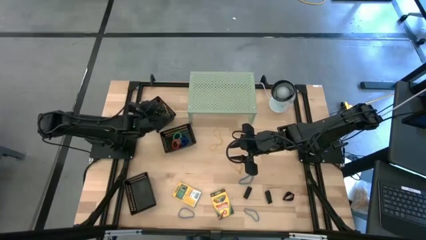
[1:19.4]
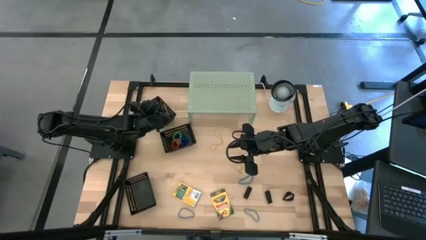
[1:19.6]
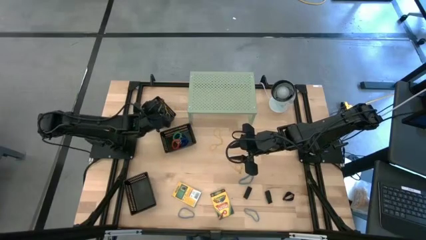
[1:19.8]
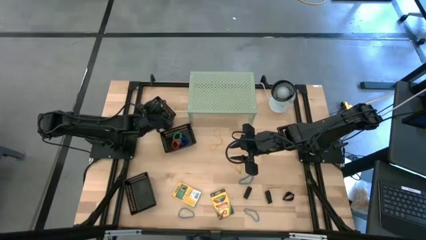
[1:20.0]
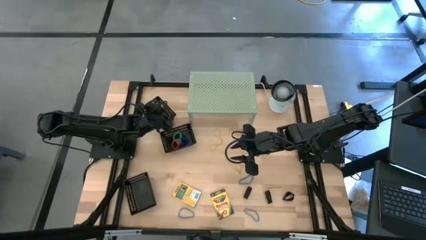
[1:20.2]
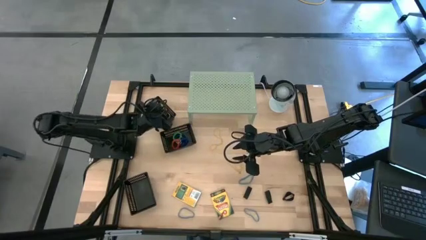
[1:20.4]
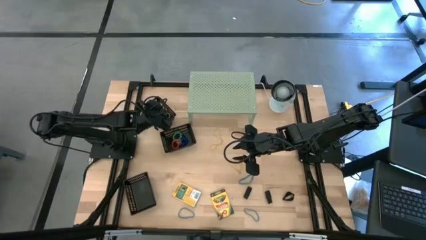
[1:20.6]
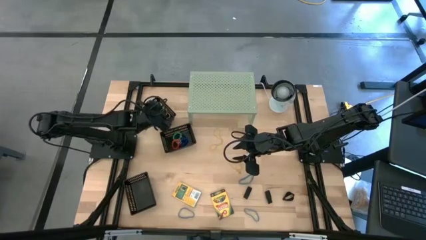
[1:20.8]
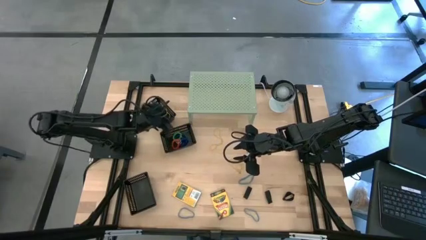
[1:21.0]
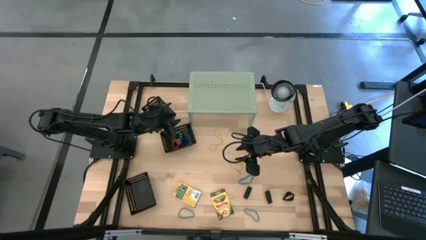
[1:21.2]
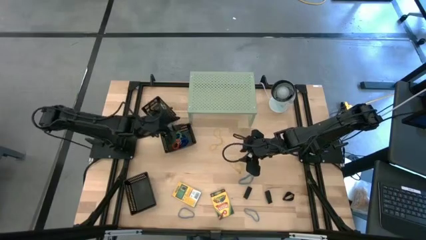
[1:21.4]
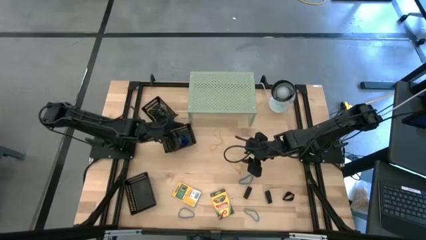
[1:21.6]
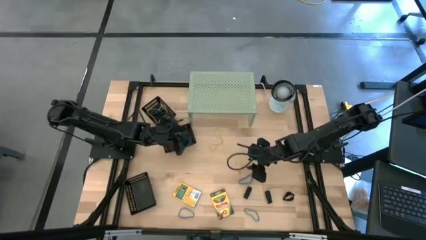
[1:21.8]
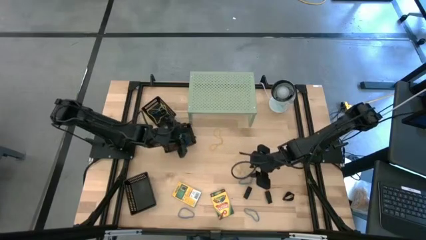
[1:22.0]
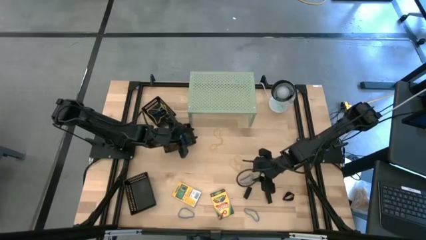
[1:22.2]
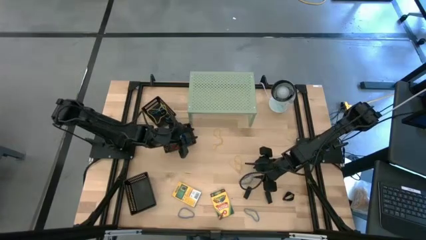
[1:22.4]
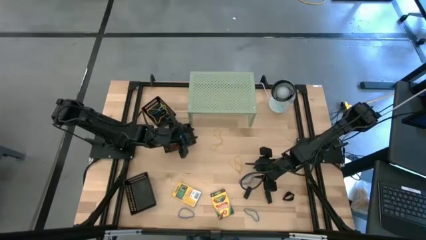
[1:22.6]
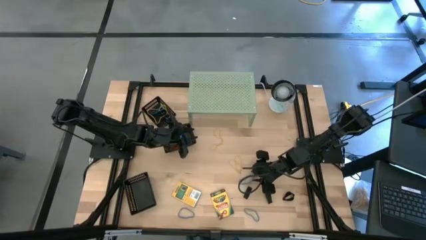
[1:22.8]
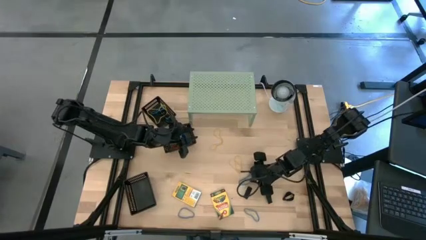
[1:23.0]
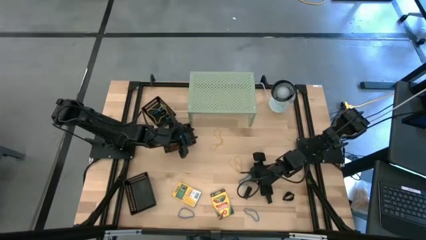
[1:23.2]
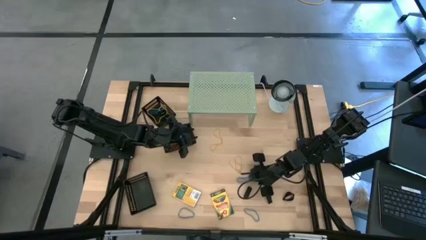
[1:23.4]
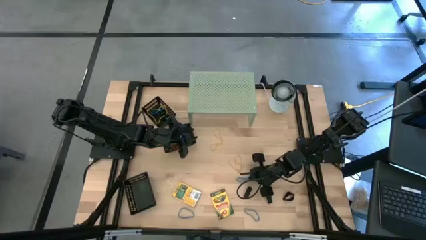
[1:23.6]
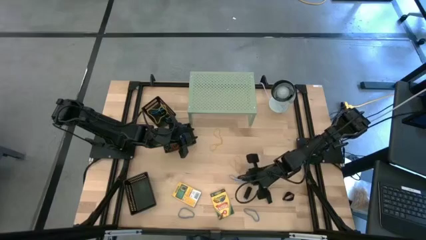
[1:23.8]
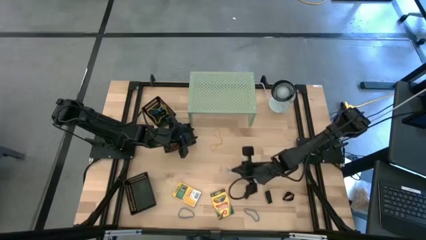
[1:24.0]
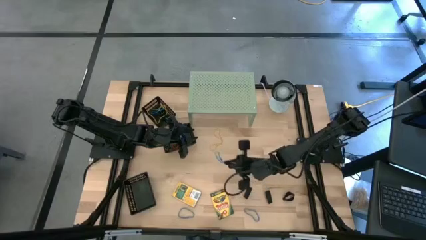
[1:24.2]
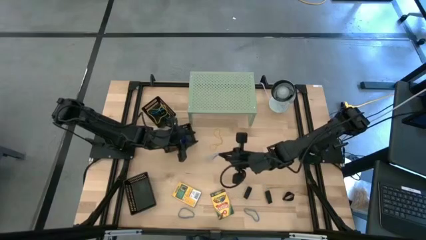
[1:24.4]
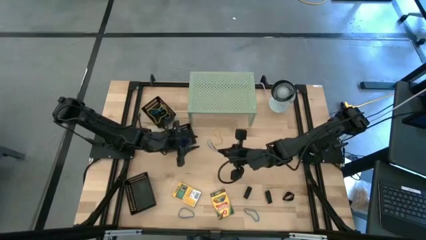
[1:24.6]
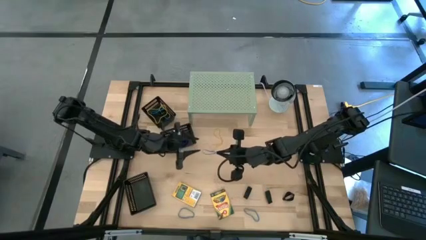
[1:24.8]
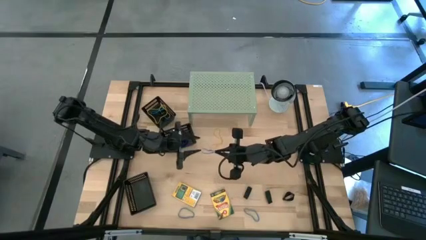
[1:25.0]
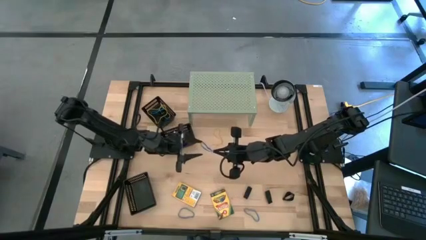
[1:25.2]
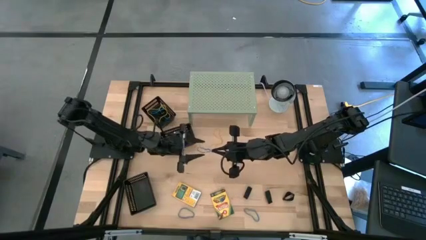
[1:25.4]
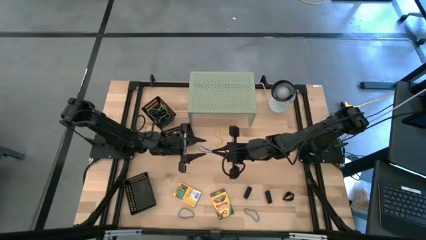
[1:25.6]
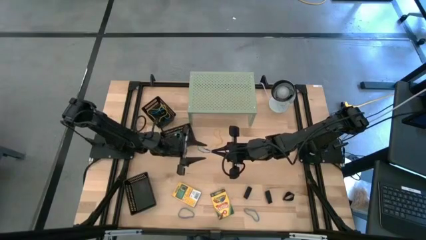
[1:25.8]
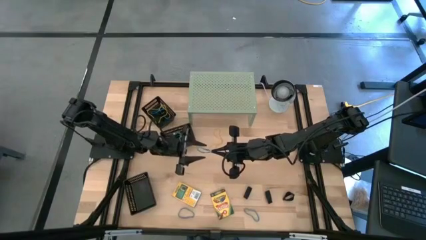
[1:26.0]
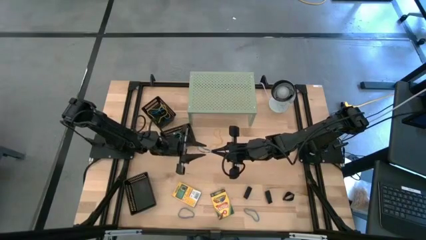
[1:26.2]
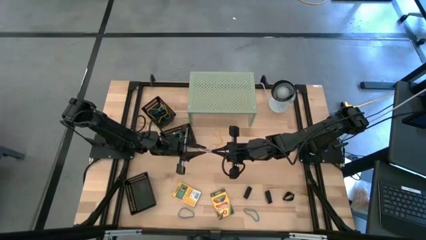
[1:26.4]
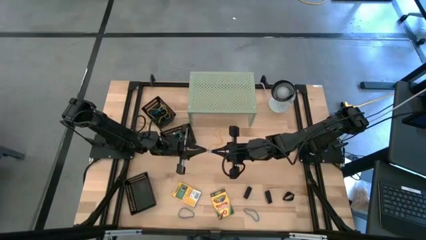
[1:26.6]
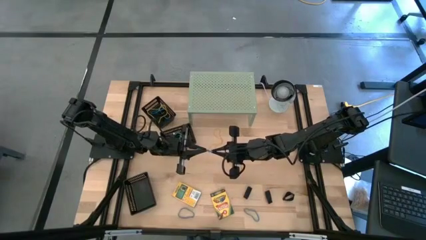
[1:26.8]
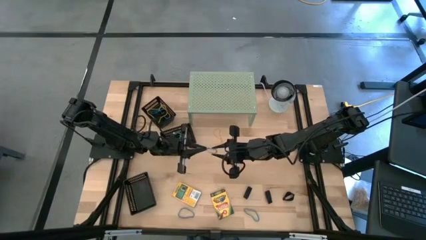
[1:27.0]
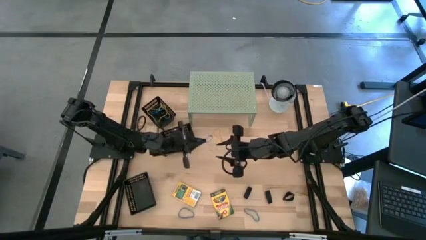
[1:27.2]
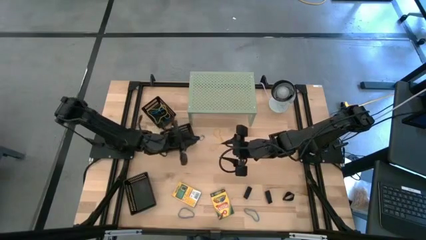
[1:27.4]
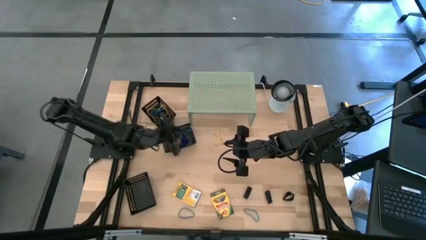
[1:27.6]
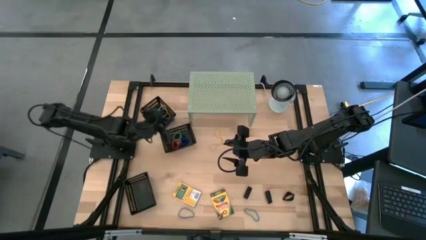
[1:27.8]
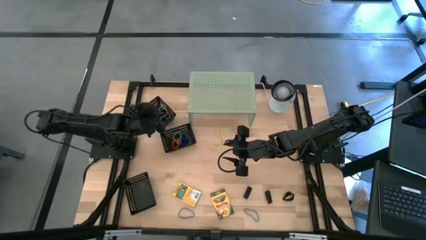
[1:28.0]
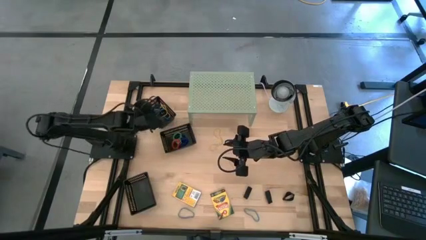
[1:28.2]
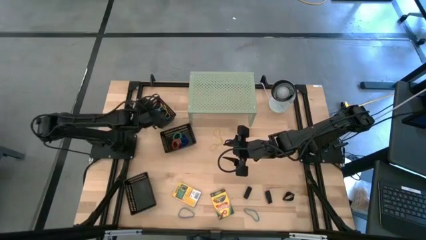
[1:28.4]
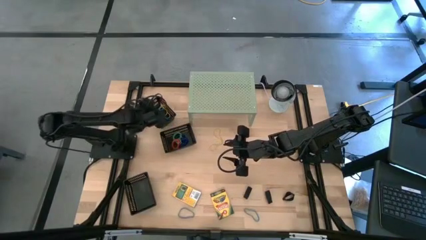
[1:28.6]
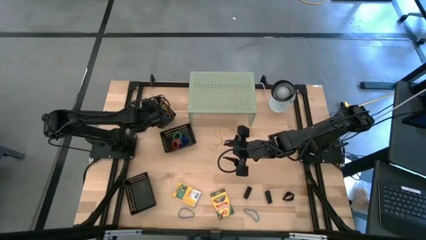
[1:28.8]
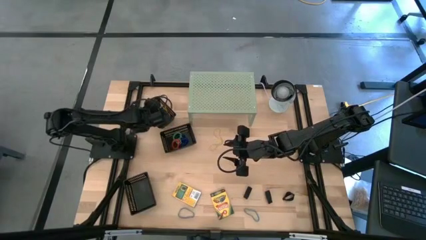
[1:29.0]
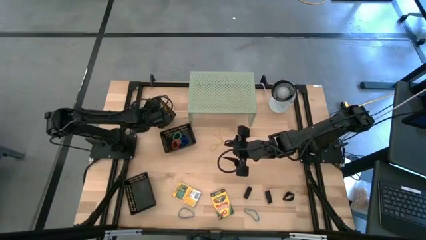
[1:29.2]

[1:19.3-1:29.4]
Task: Pick & Place Office Desk Supplies
Put the blue rubber band into the top black bin

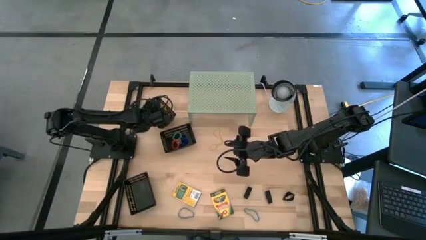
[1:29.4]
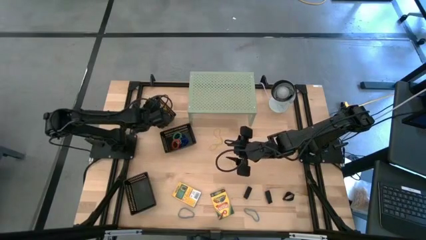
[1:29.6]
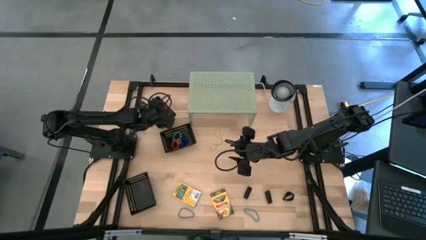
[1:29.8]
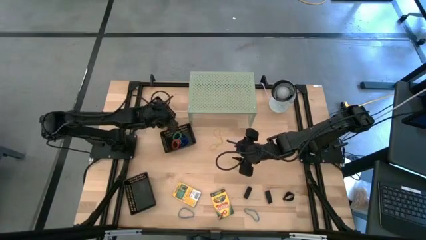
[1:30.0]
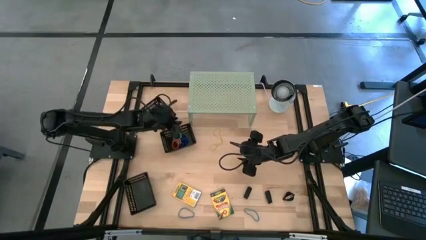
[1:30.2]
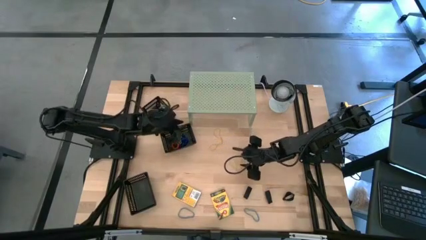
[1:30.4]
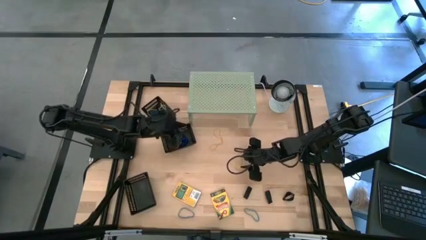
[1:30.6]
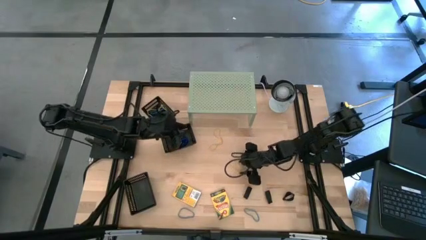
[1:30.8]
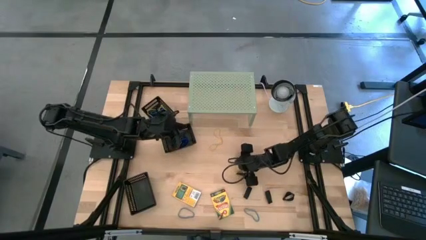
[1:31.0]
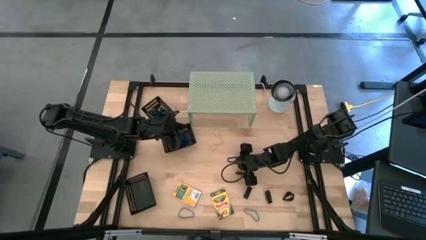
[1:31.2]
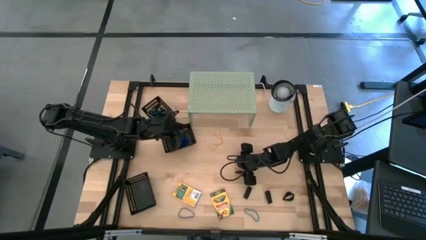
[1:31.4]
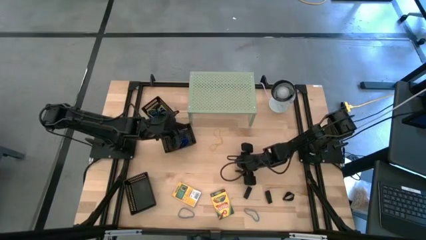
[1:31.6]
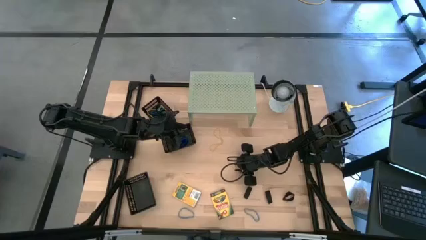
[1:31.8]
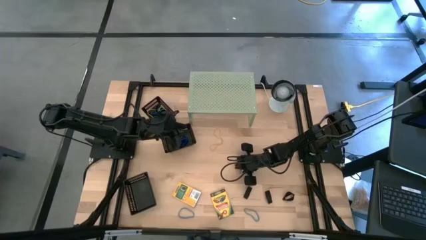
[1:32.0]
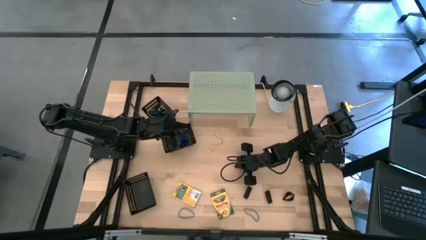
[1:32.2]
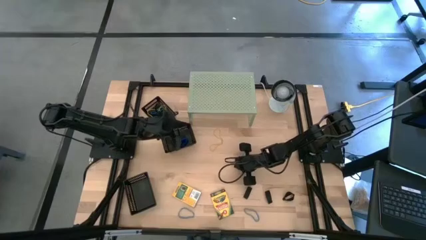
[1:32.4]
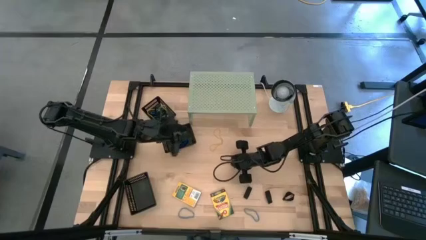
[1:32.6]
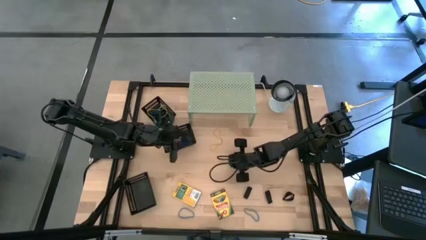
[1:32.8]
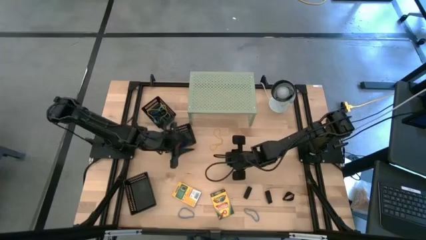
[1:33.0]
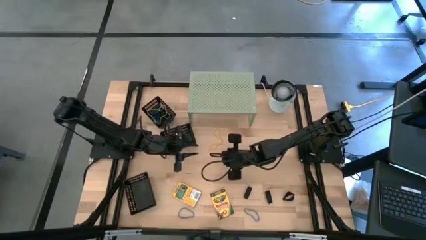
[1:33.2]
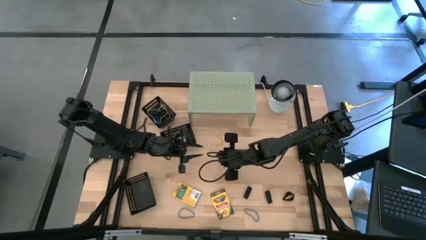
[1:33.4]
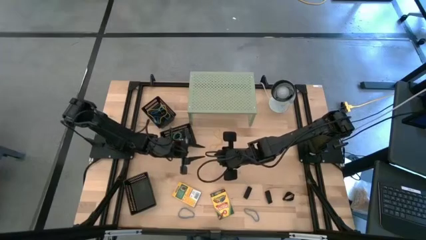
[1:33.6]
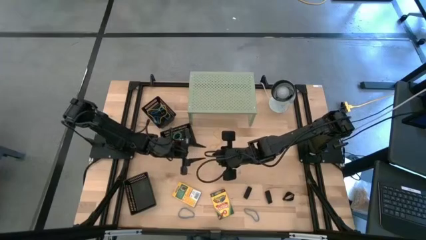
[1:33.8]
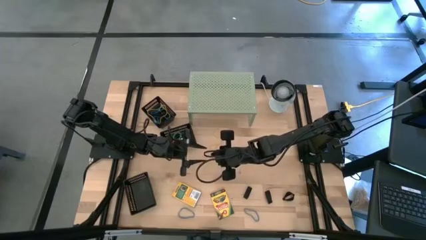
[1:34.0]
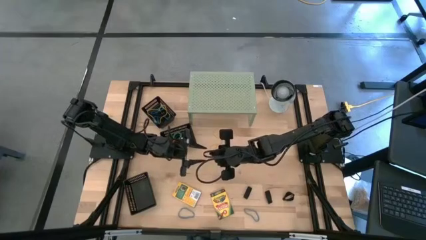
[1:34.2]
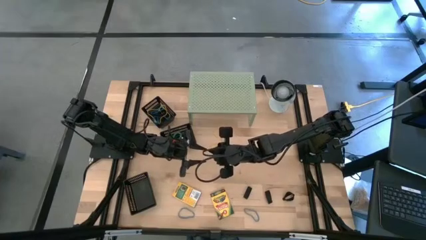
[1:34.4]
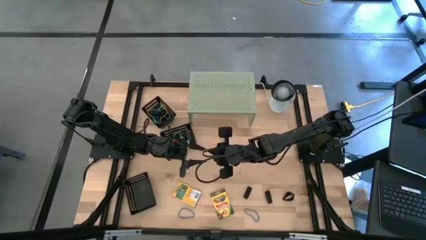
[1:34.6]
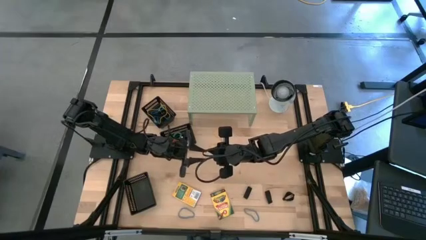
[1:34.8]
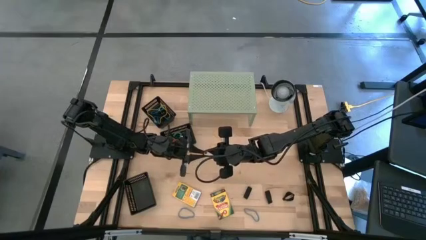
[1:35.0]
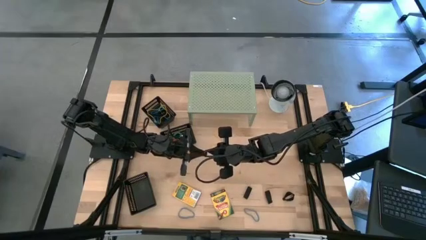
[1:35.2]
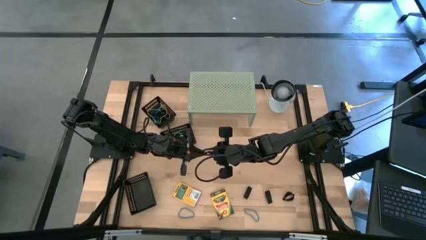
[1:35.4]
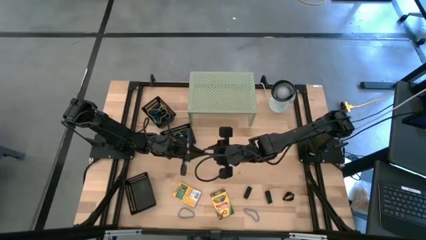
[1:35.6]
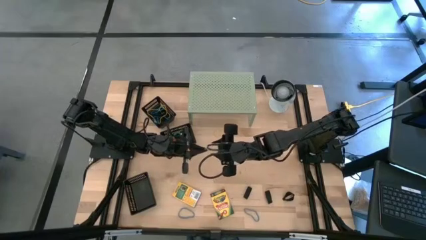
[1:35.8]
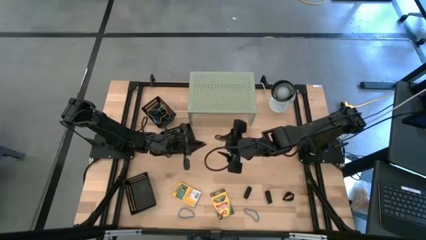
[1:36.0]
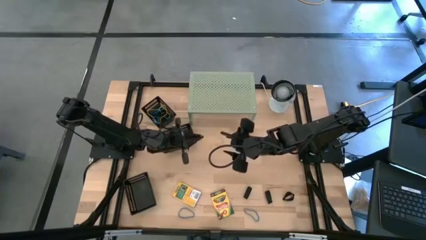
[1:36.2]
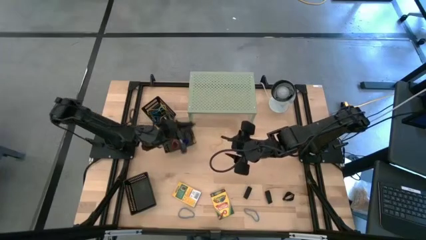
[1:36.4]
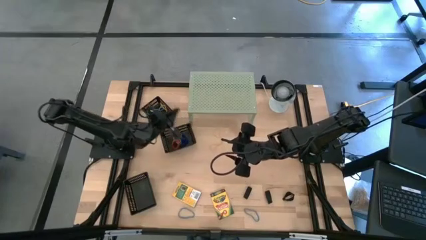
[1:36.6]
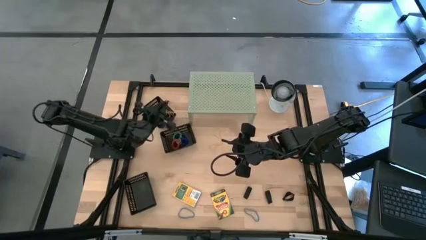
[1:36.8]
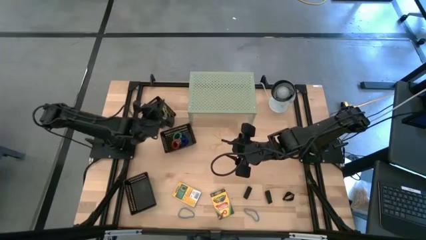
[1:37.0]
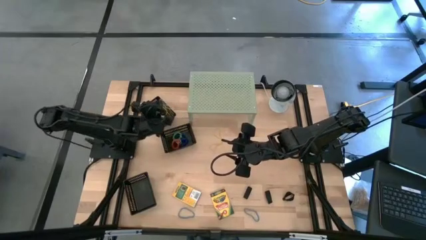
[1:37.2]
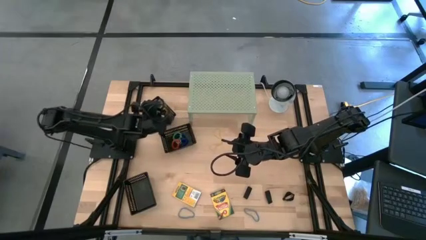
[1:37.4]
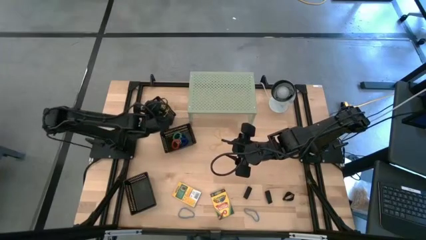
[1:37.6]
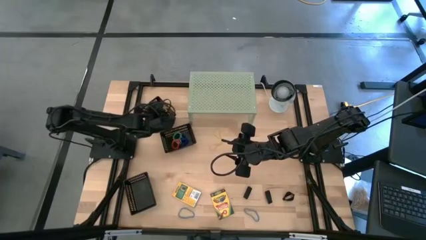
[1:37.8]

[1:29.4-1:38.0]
Put the yellow rubber band into the top black bin
